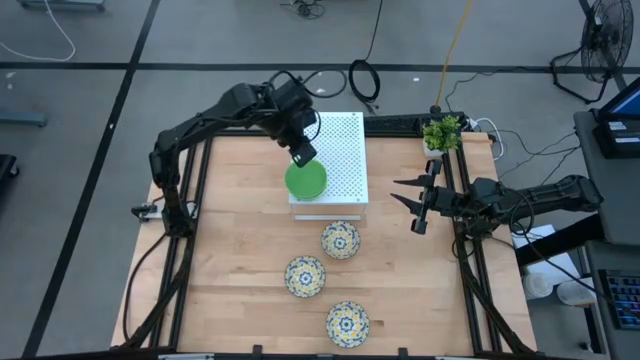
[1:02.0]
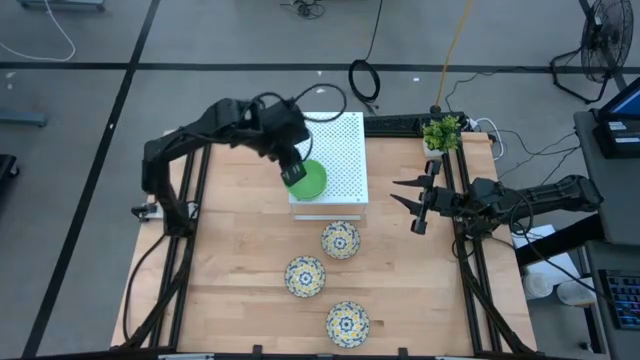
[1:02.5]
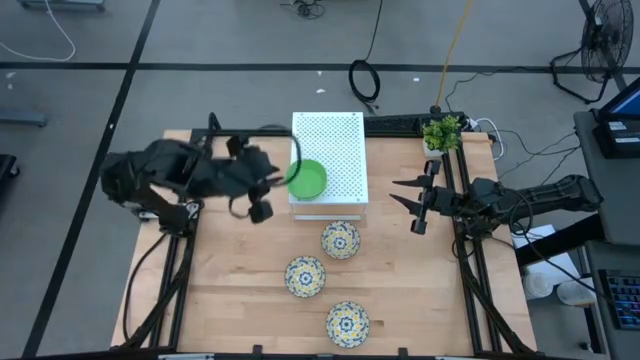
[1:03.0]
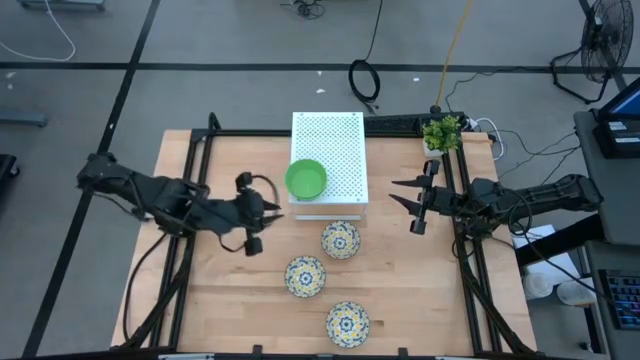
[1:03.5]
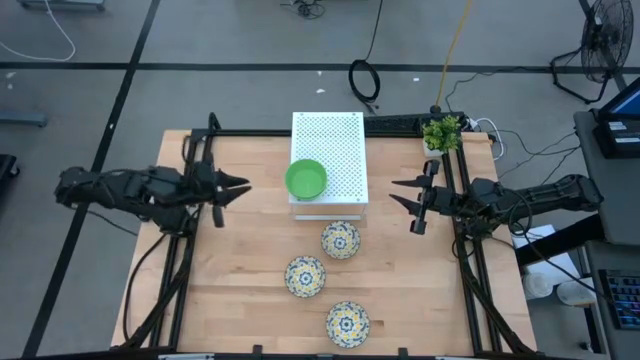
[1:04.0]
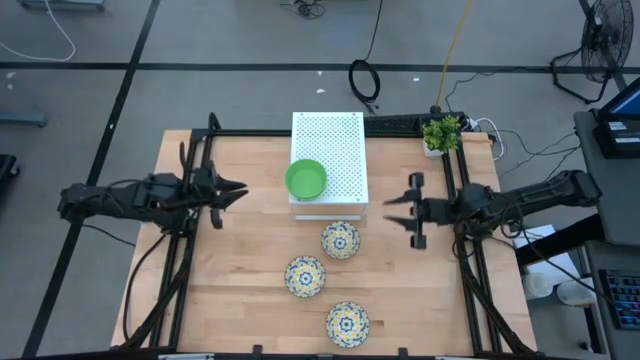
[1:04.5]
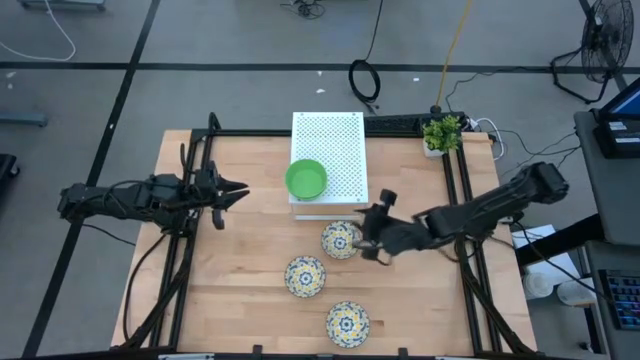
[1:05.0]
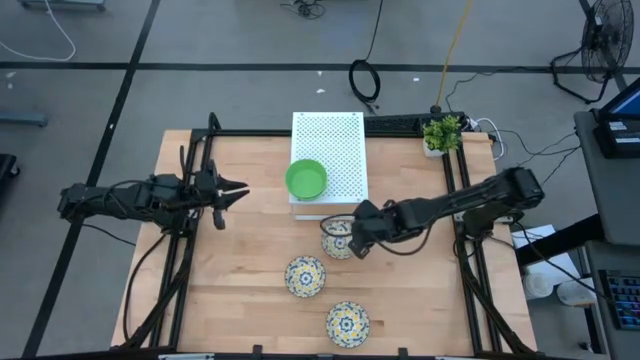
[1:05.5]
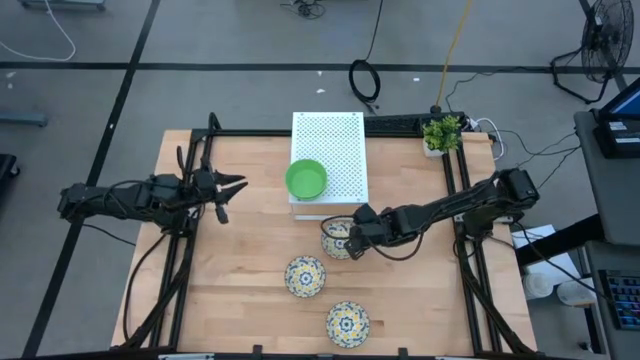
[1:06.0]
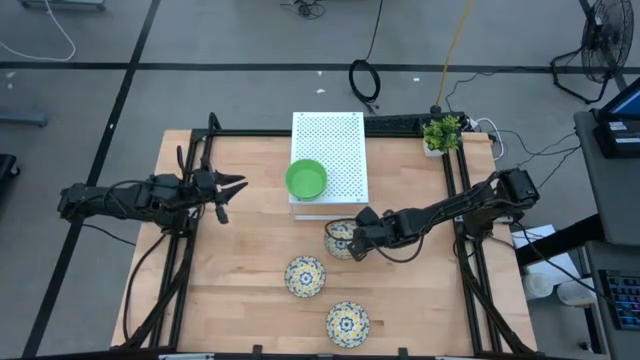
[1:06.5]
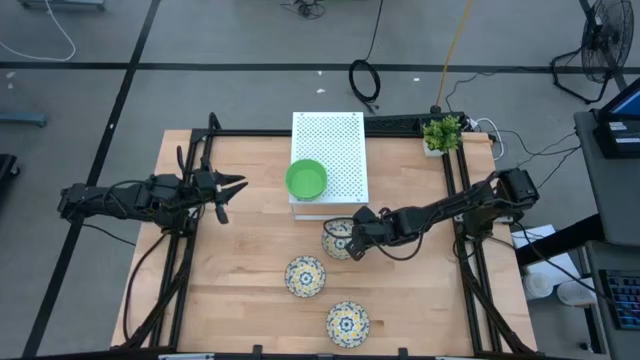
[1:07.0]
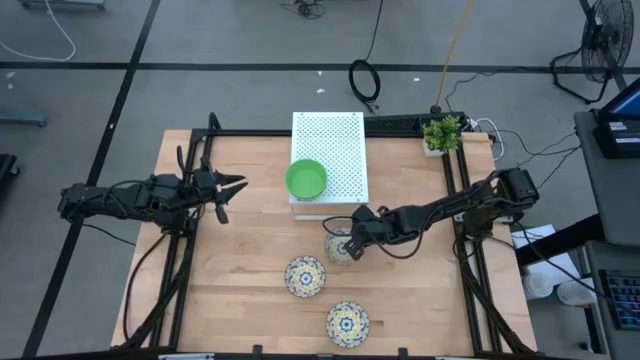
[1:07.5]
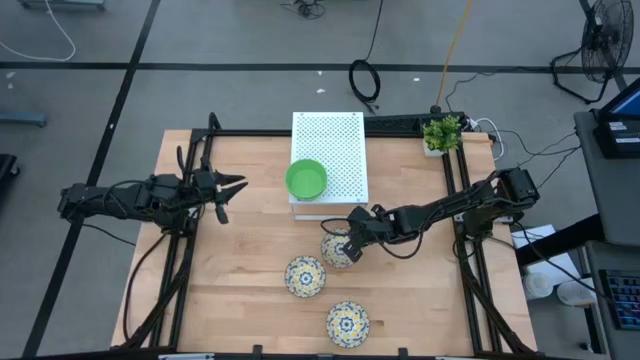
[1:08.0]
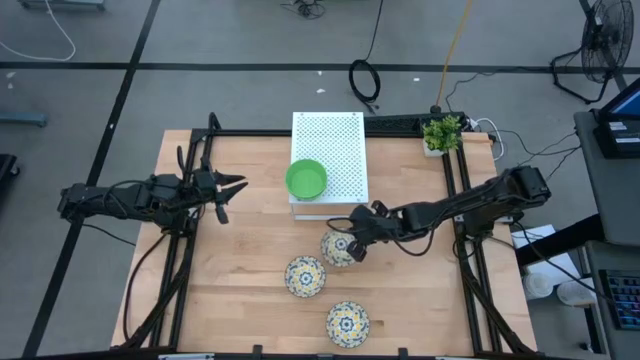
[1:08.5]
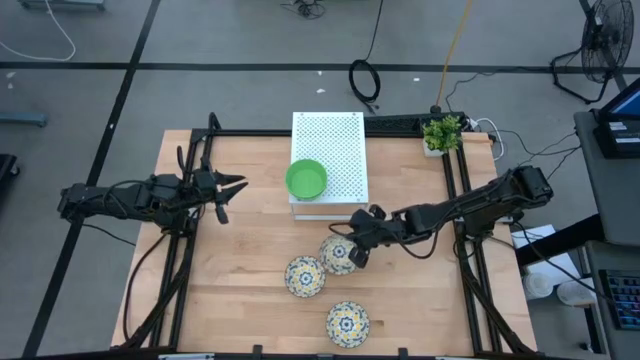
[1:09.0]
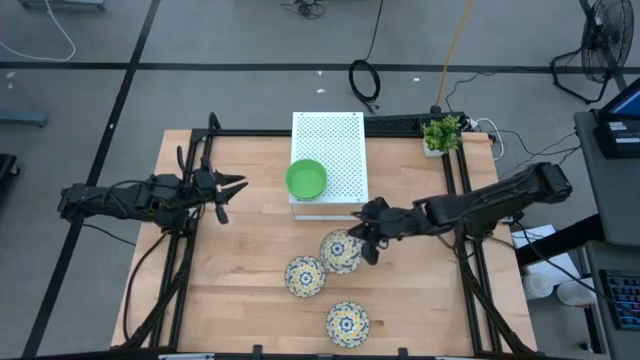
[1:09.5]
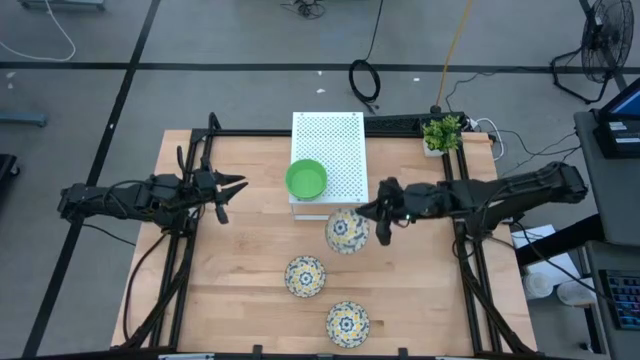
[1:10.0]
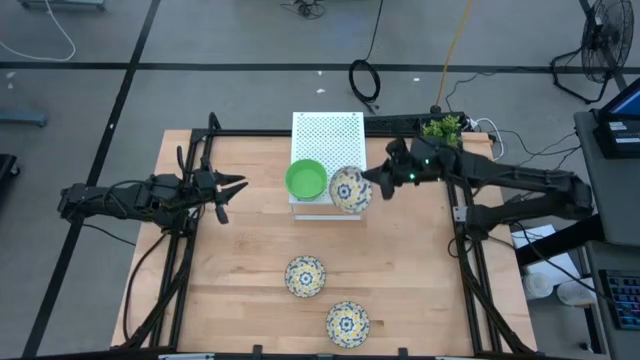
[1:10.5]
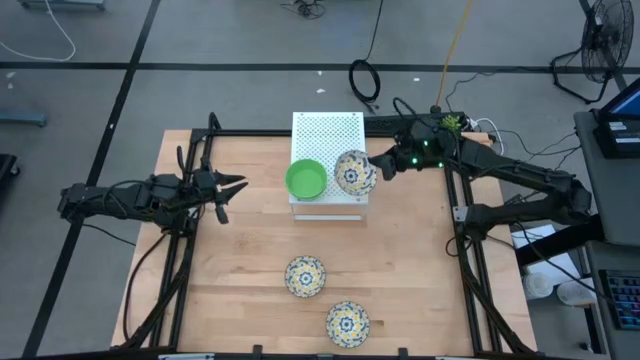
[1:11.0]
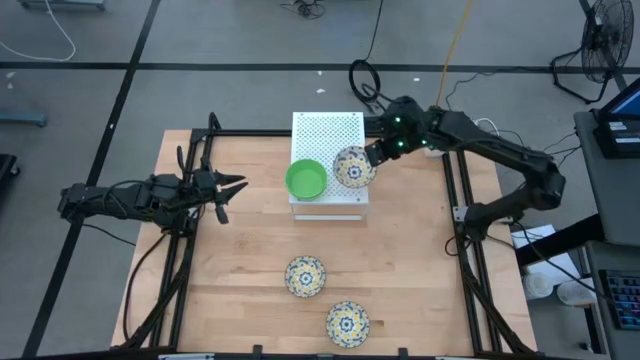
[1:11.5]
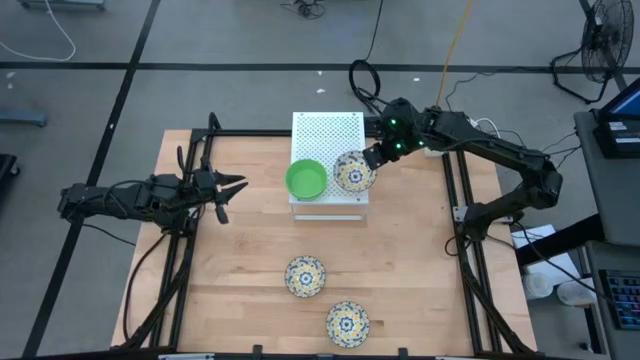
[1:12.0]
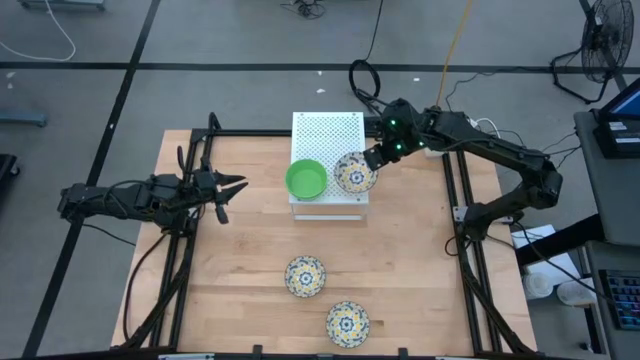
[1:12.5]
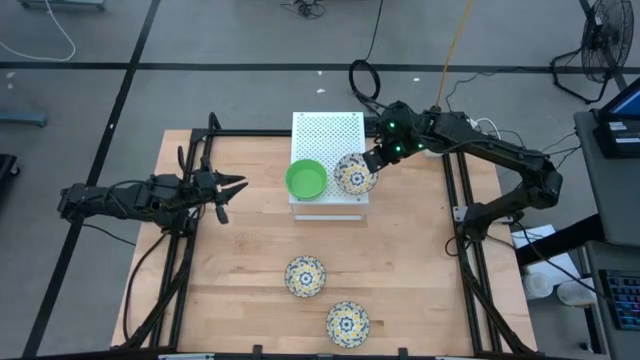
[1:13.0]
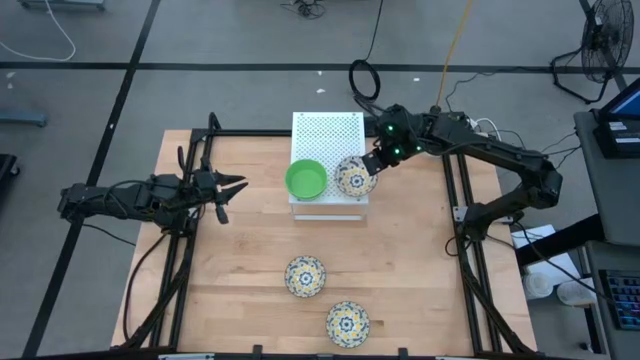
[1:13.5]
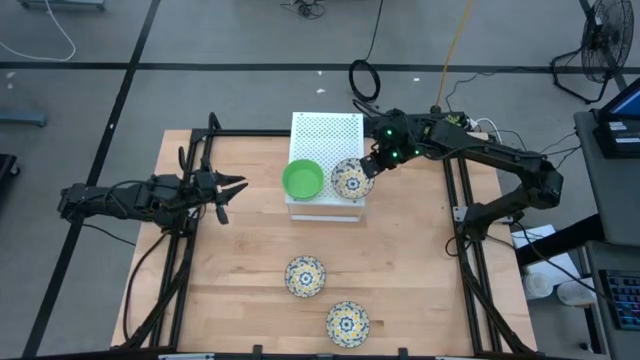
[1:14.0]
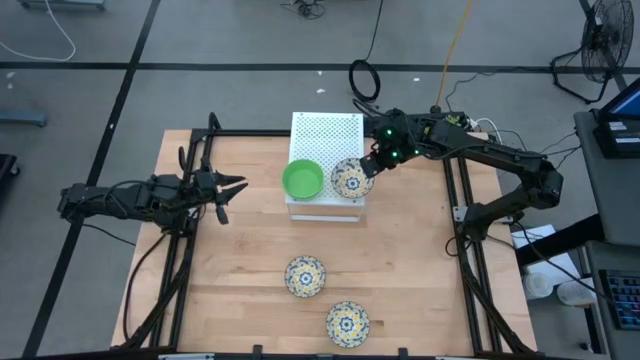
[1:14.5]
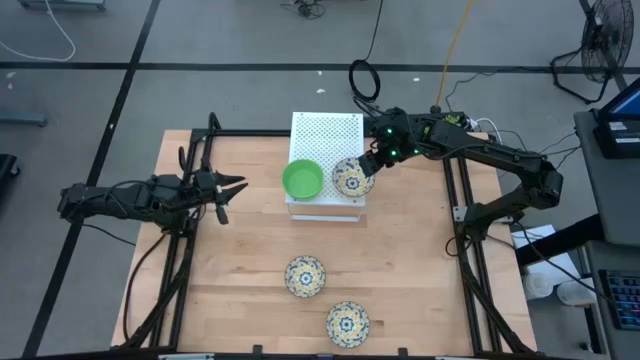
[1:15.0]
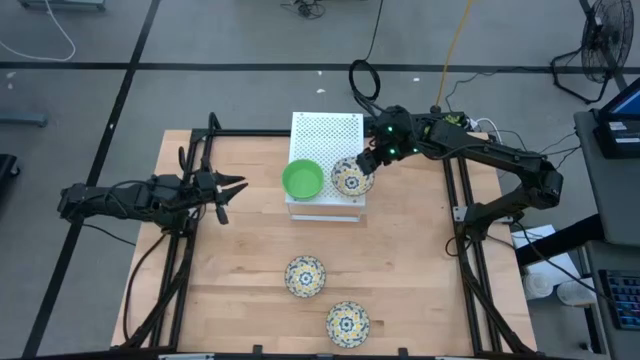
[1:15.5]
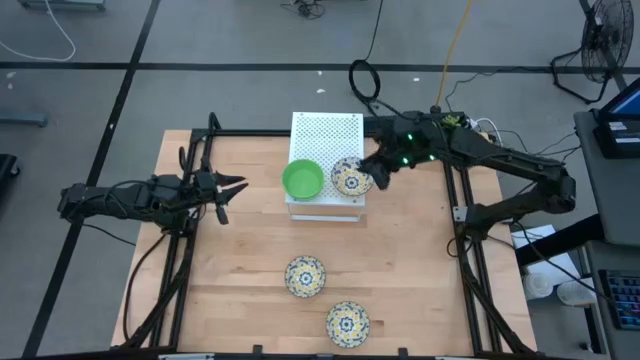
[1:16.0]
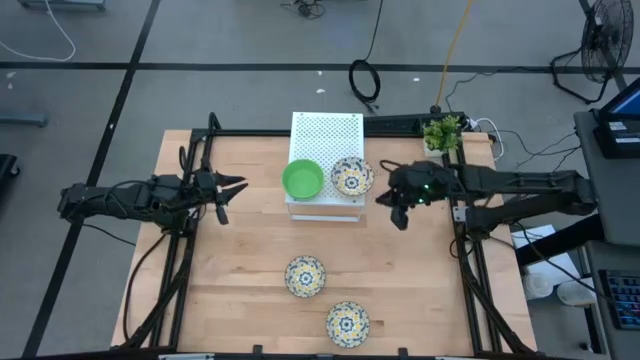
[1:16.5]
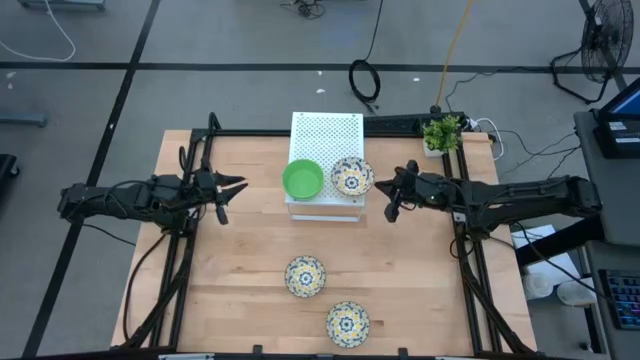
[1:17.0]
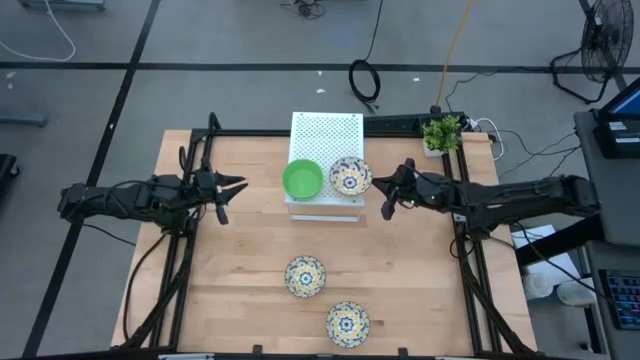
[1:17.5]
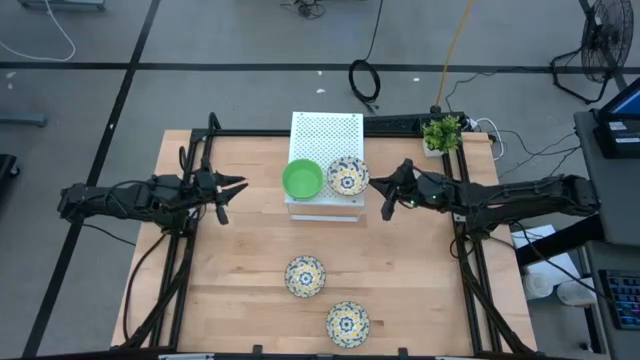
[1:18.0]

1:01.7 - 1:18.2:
Task: Pick & Place Mini bowls
Put the top white bowl on the shelf

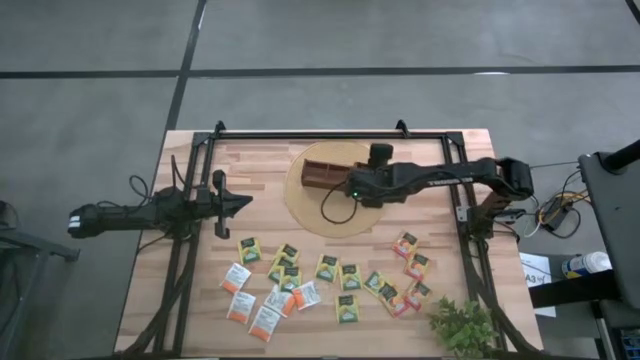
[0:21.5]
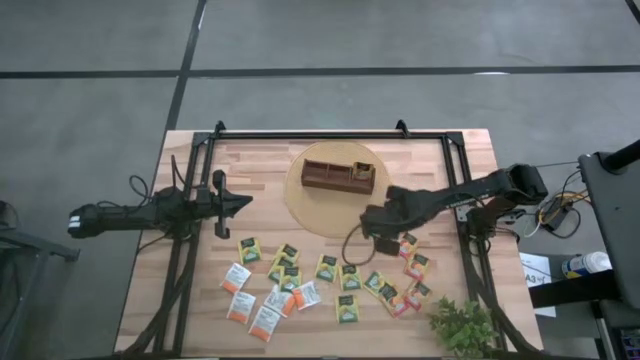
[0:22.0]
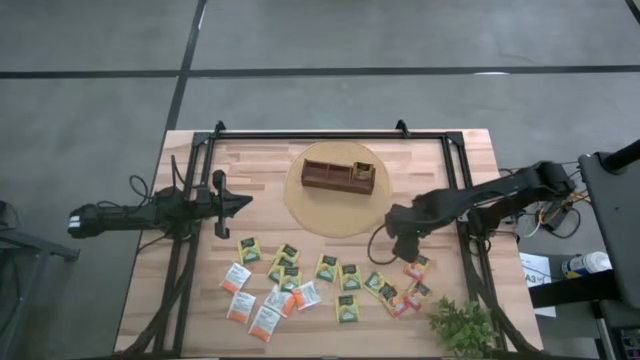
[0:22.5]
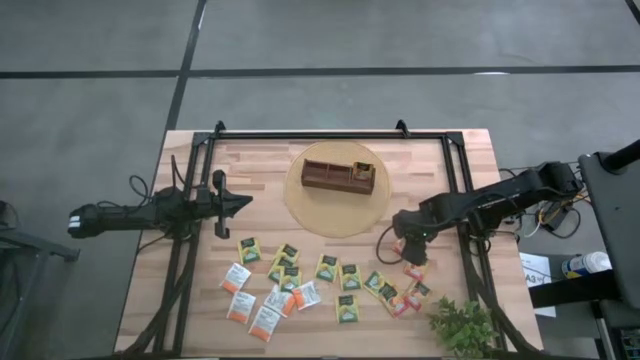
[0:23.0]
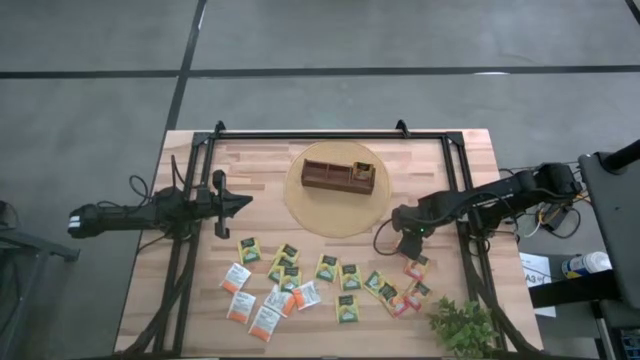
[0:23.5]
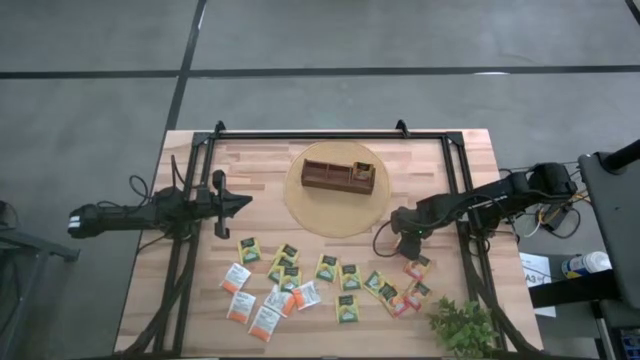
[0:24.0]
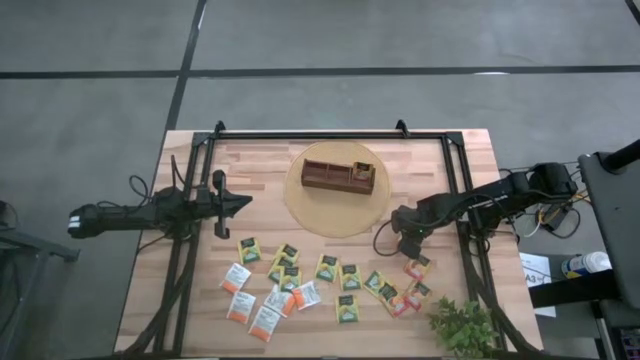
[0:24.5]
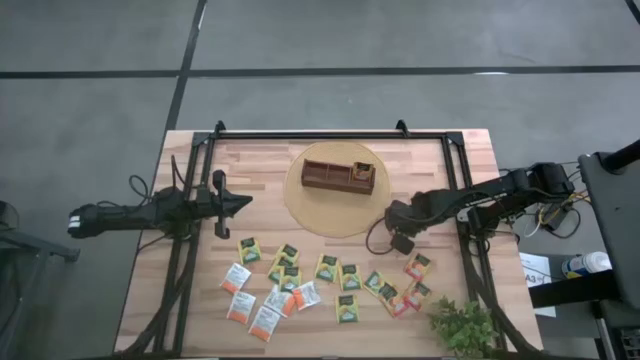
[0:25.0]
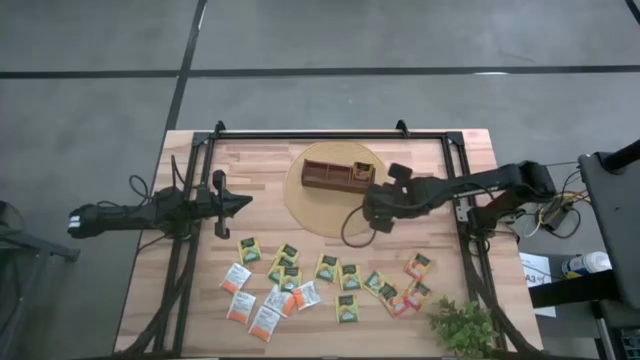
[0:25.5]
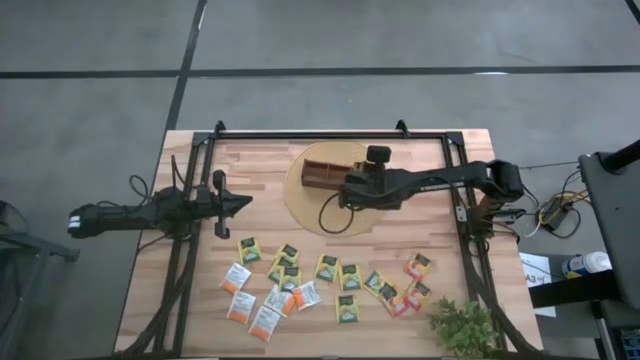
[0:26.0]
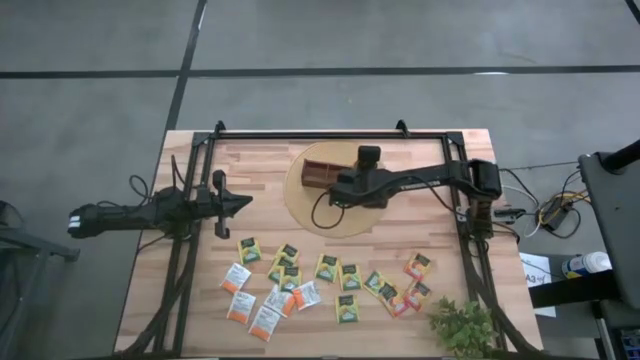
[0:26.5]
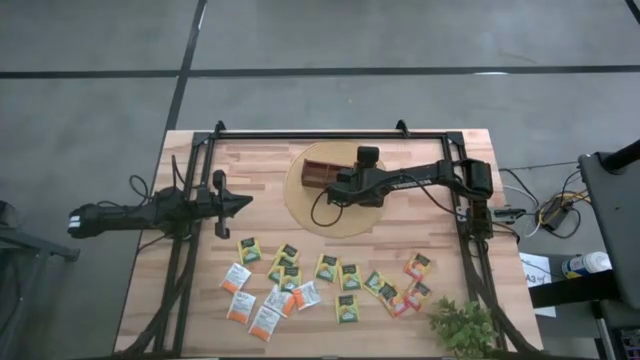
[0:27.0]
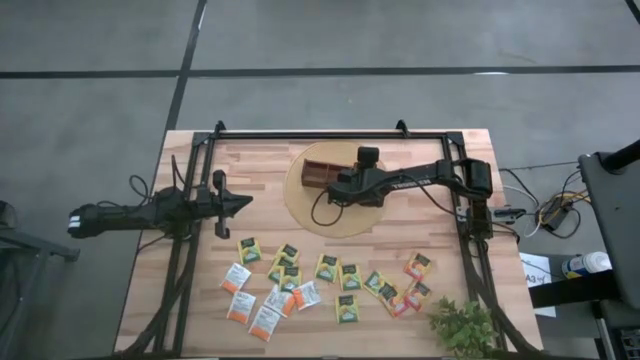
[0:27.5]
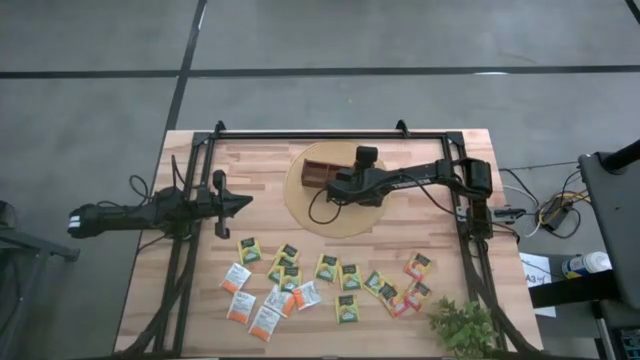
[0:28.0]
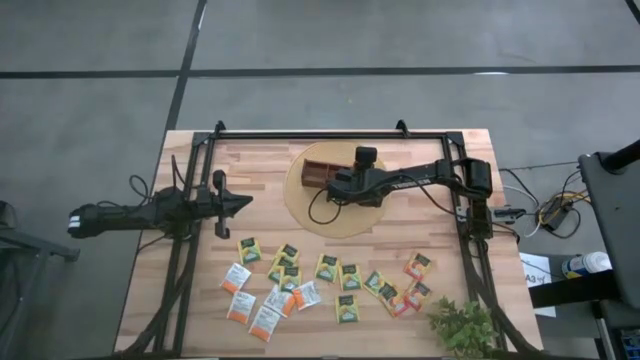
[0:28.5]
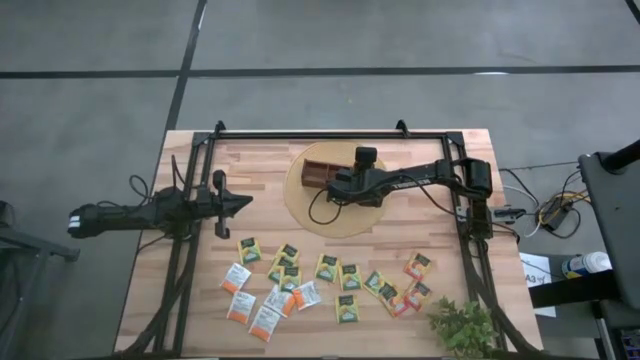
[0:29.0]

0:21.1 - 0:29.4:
Task: Pick & Place Tea
Put the orange tea bag into the right section of wooden organizer
